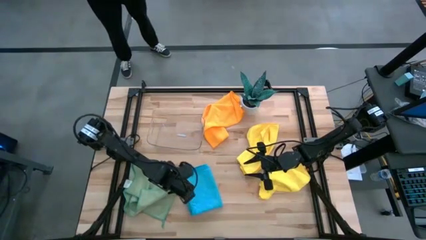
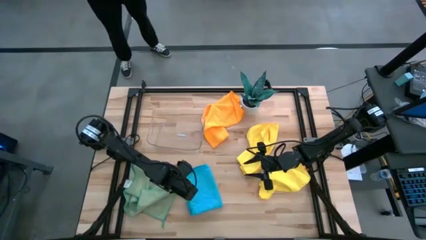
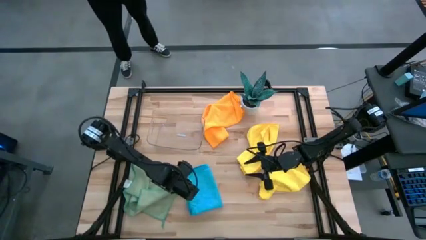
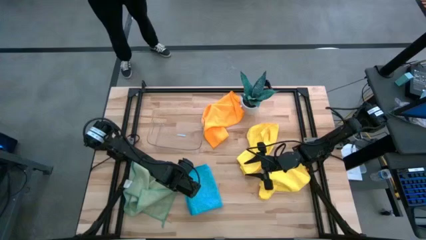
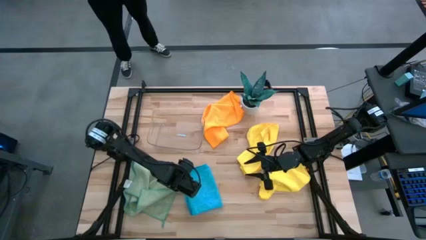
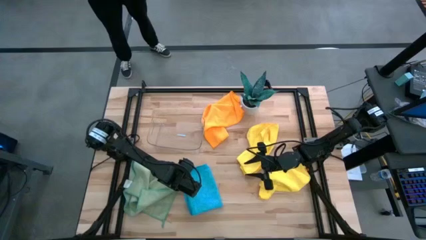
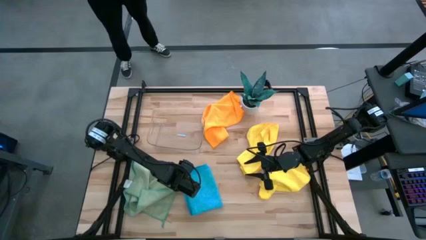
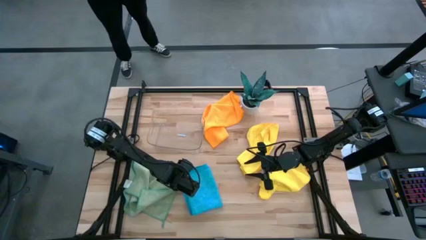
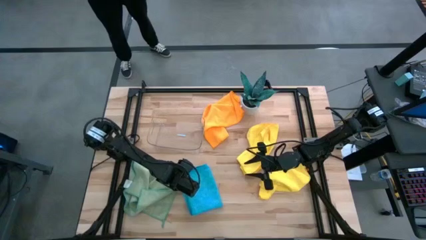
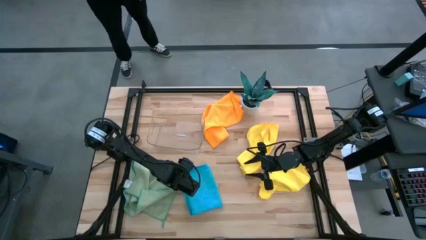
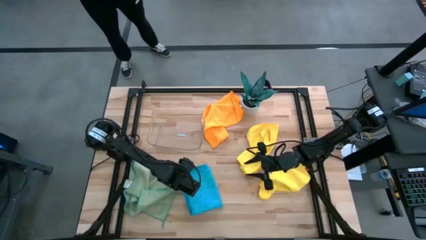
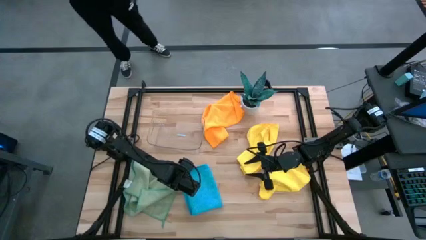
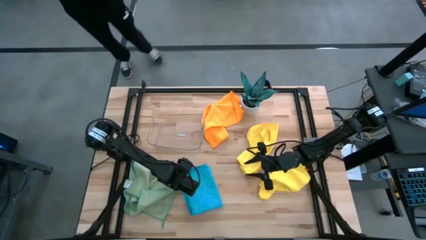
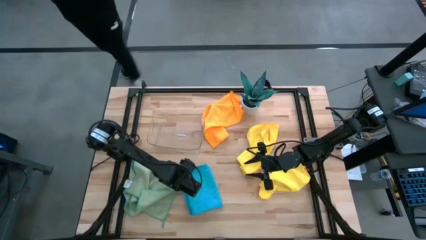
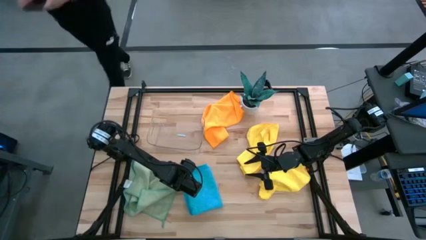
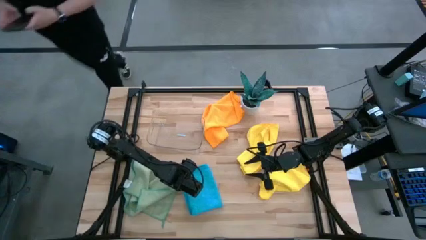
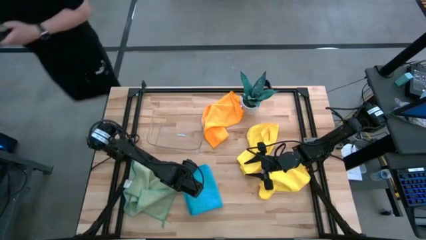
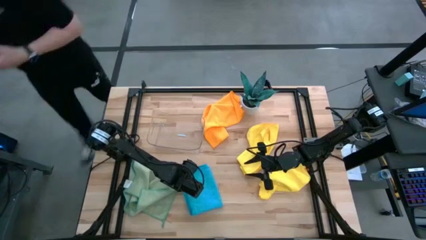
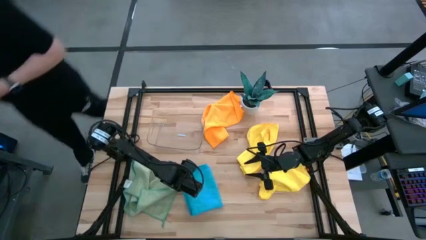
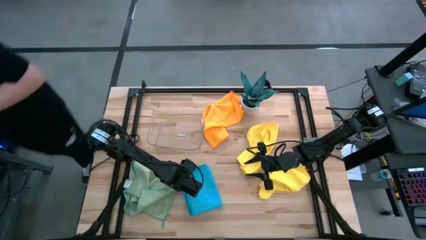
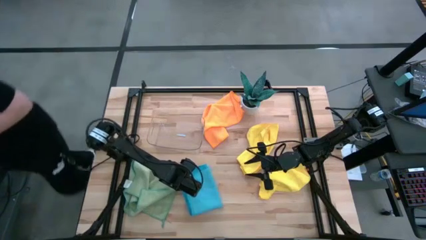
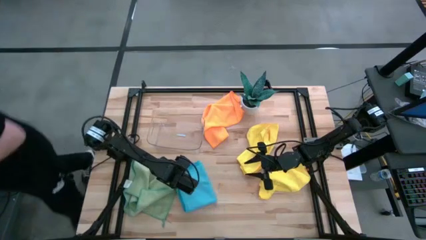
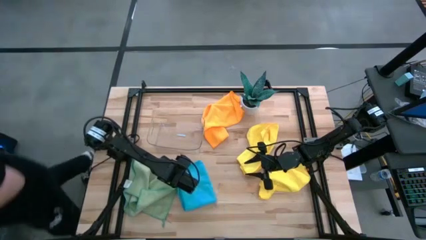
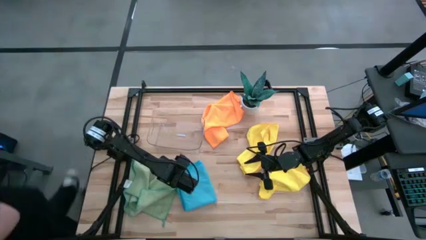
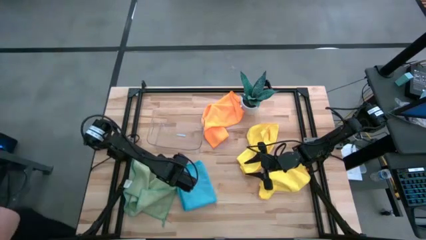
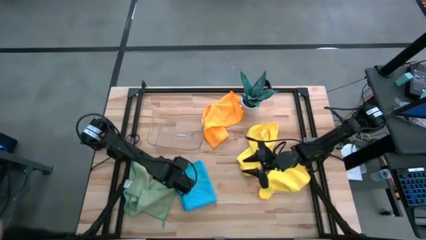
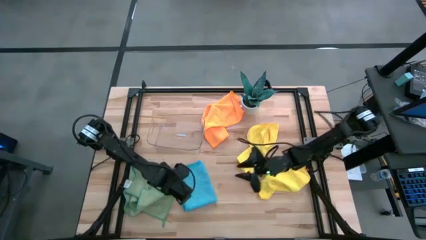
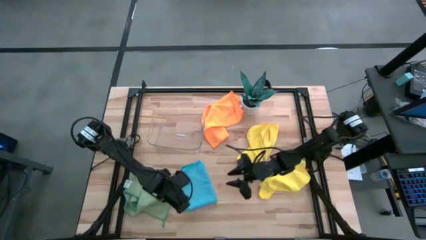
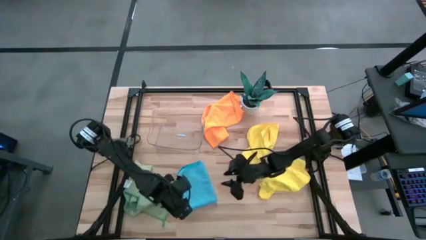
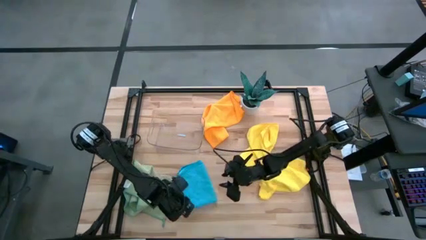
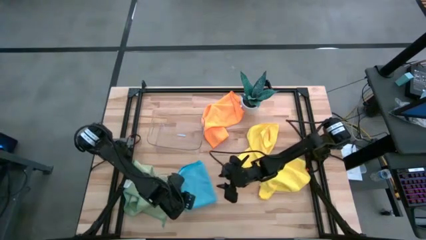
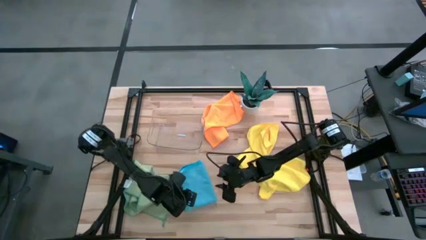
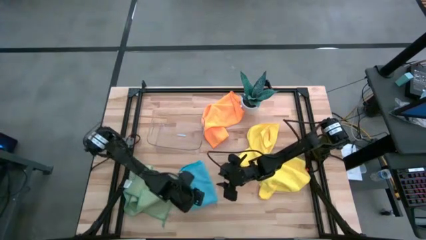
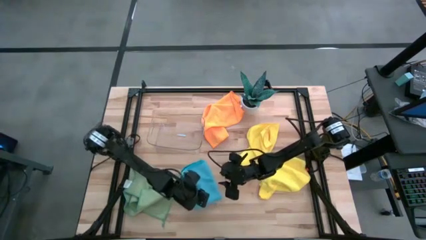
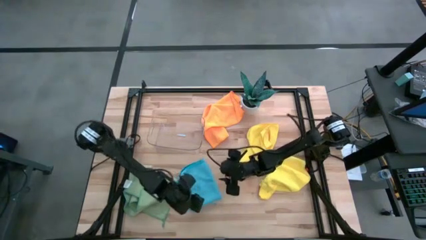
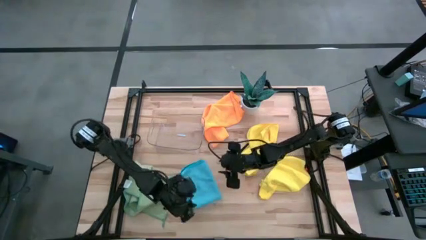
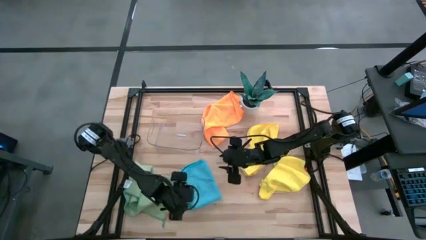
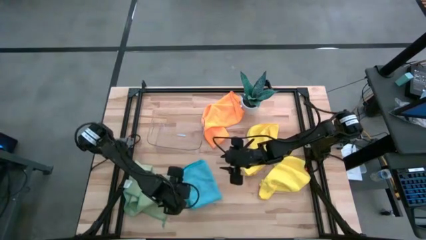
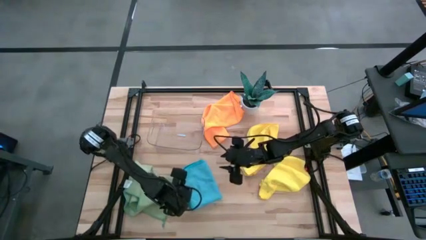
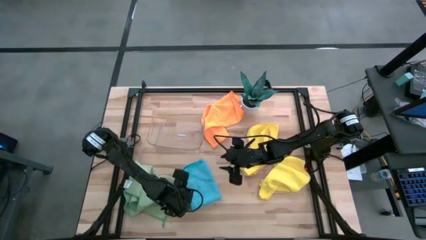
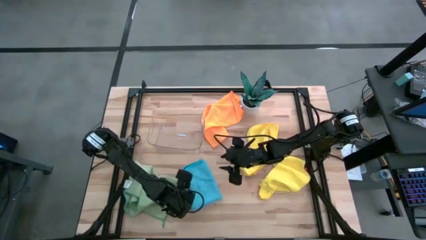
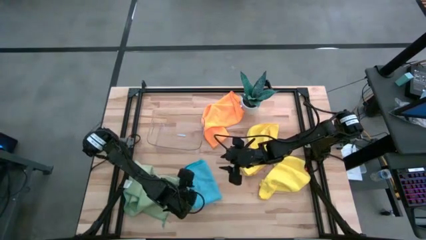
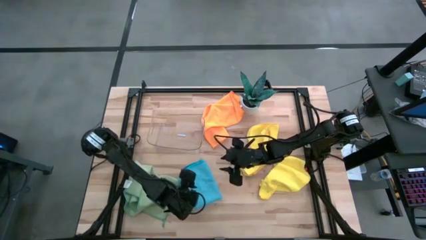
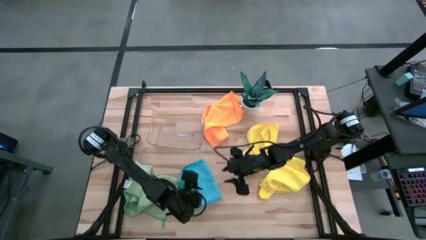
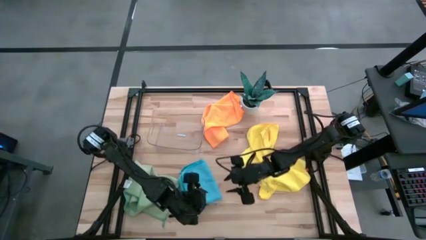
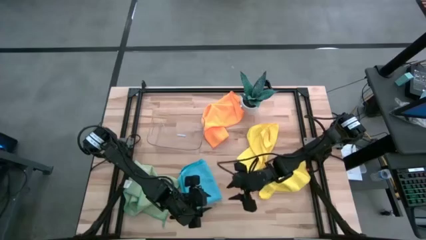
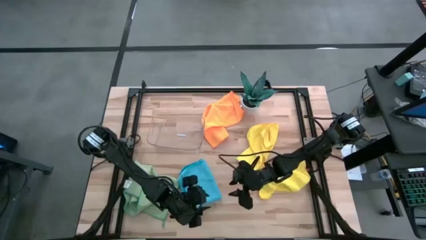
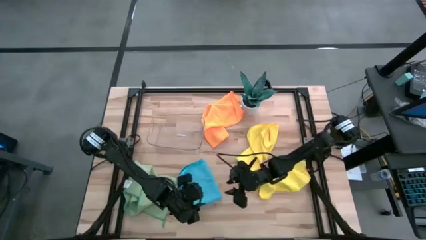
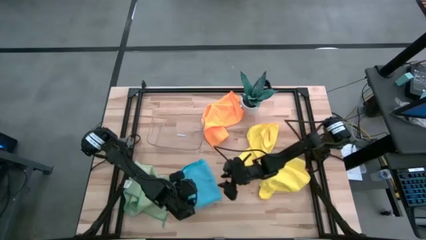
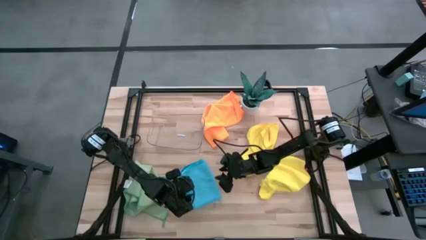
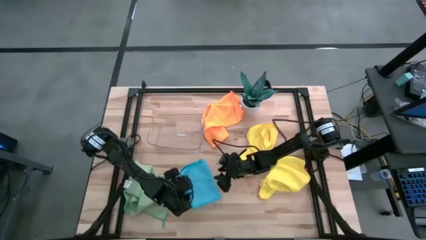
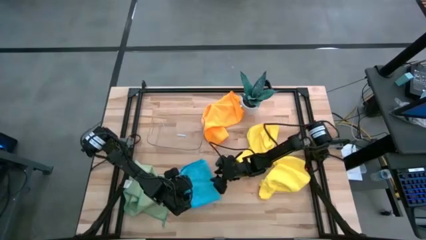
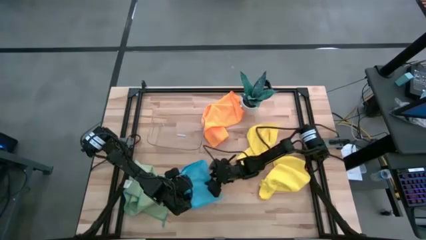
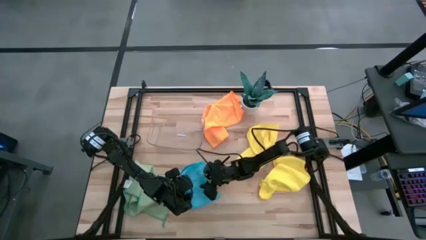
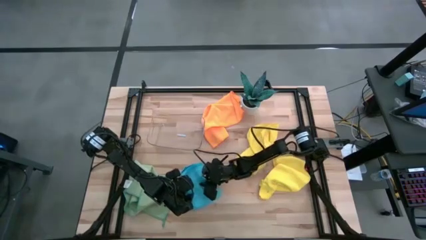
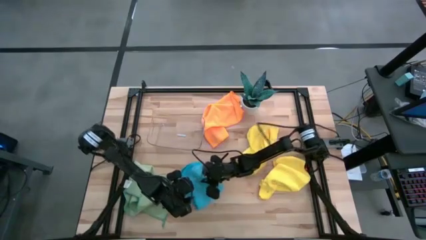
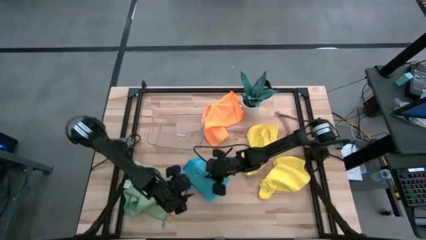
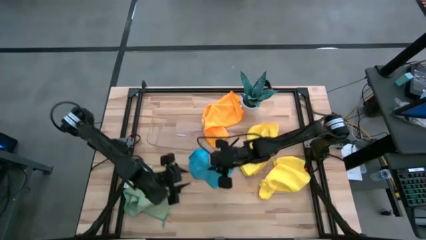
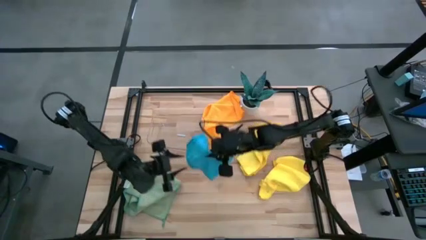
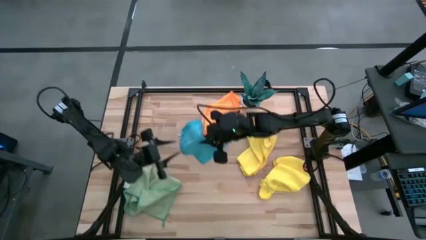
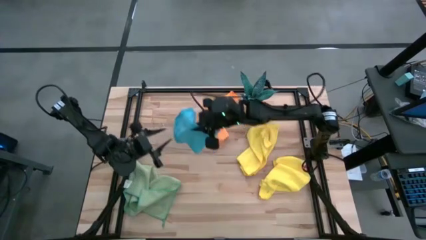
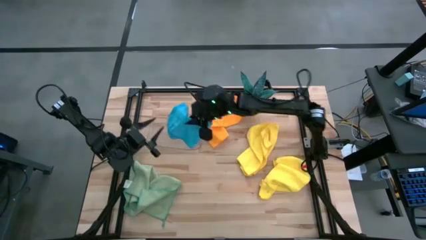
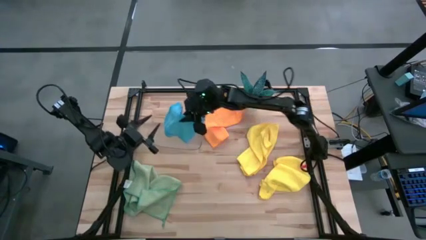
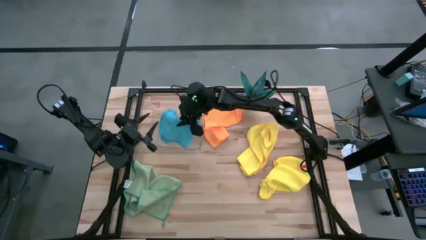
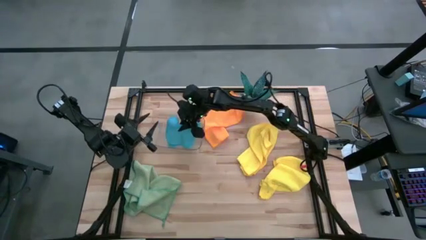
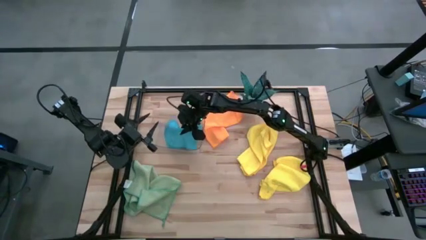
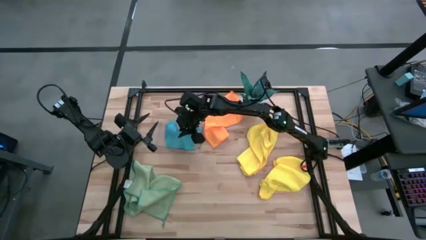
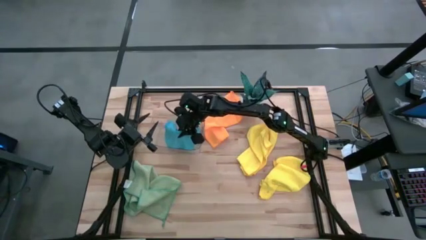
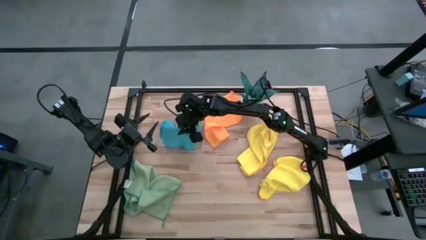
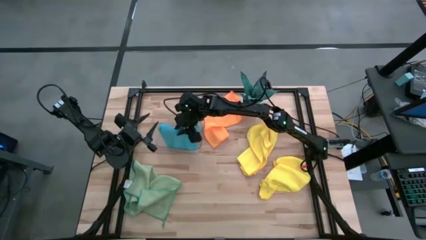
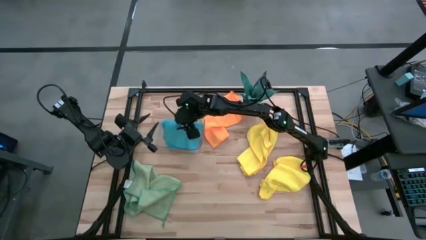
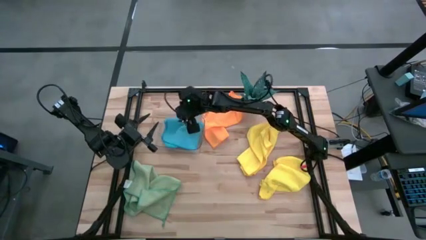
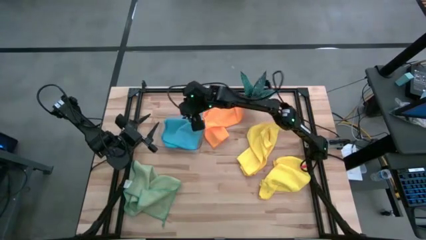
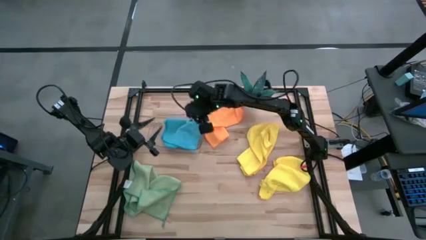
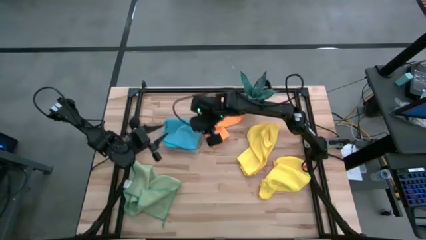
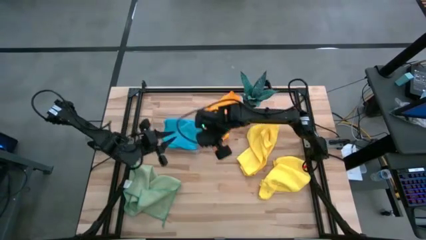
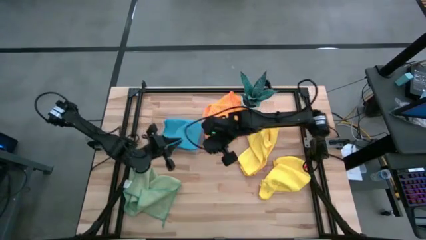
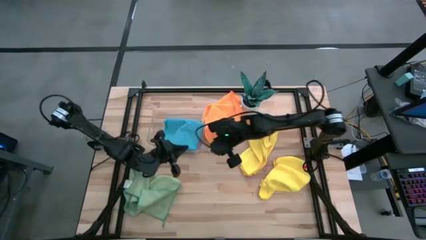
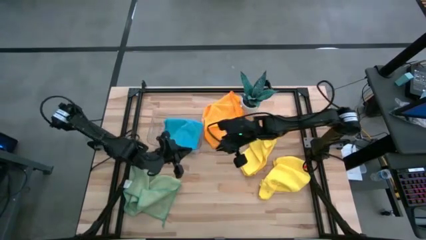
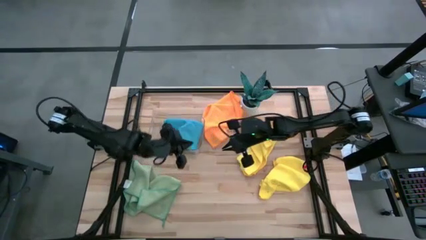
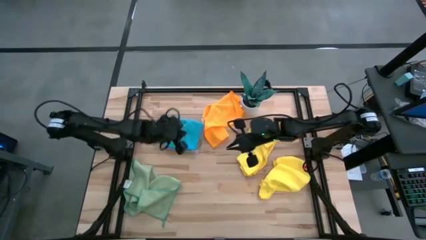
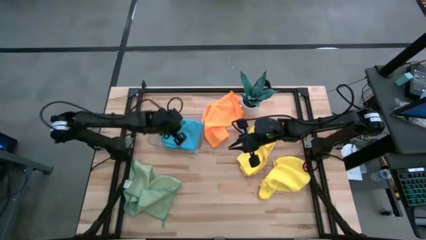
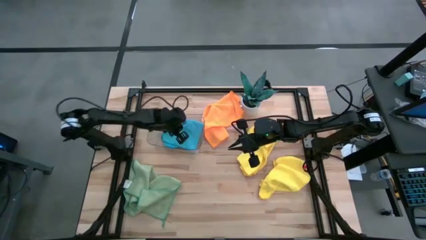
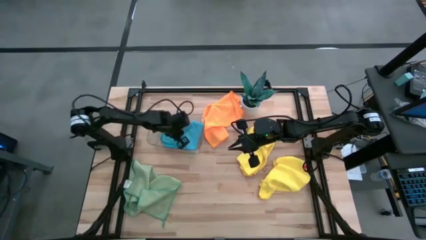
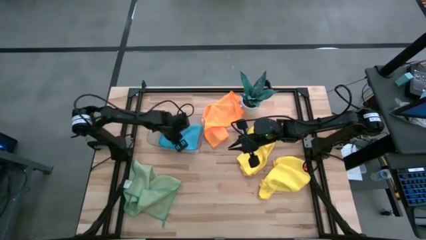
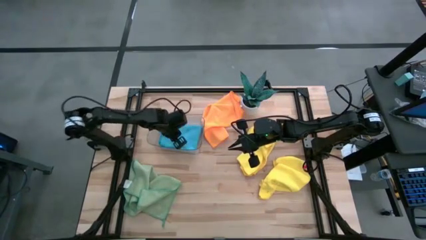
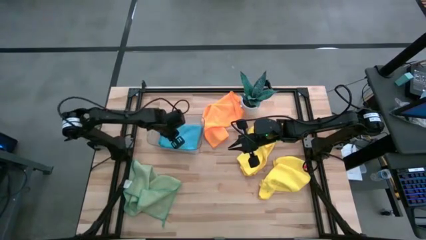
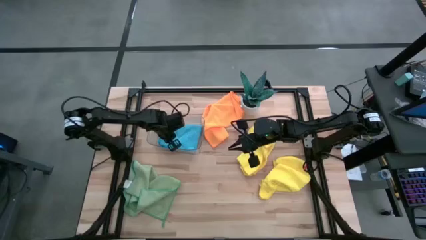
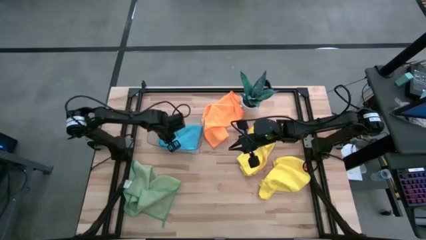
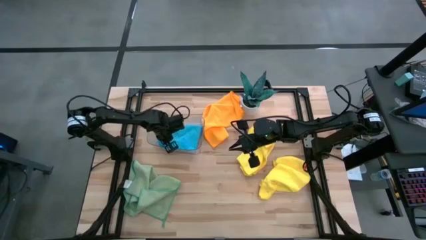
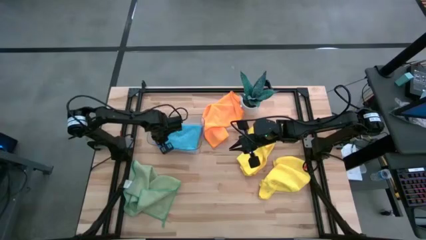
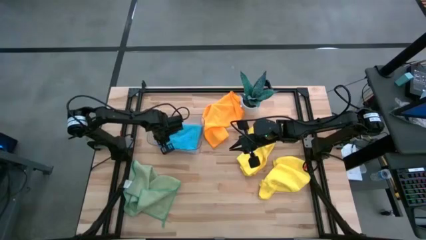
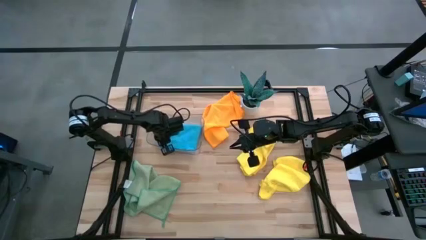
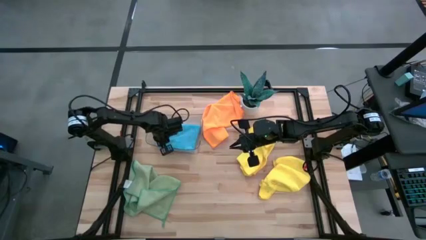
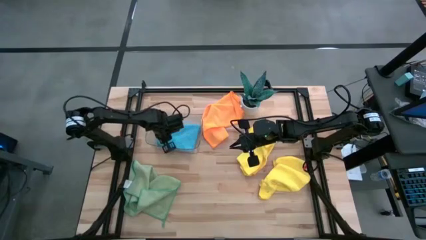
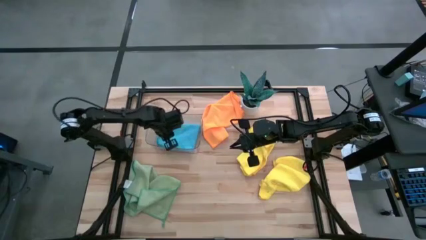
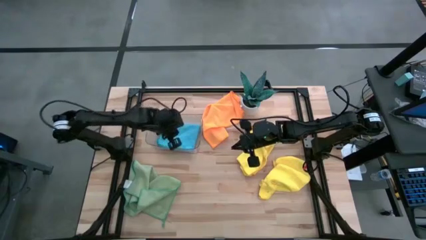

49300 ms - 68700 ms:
Task: Fold microfiber towels
Put the blue microfiber cloth into the transparent bin
